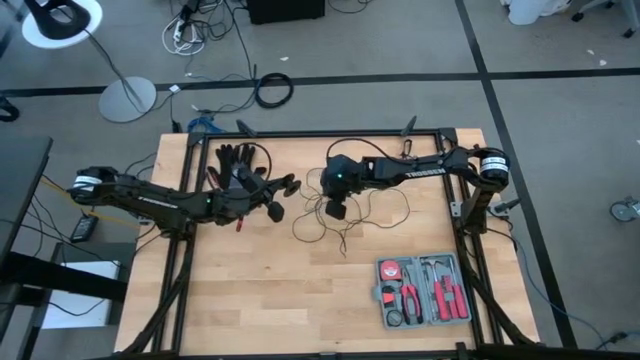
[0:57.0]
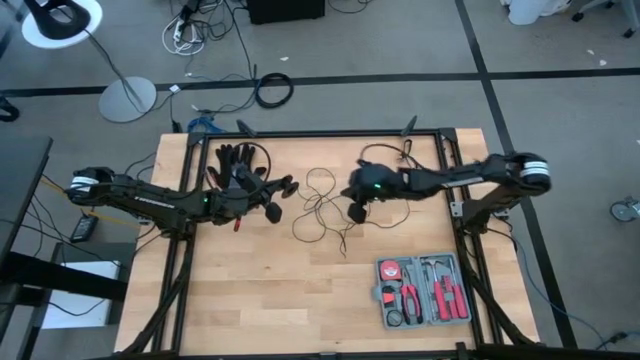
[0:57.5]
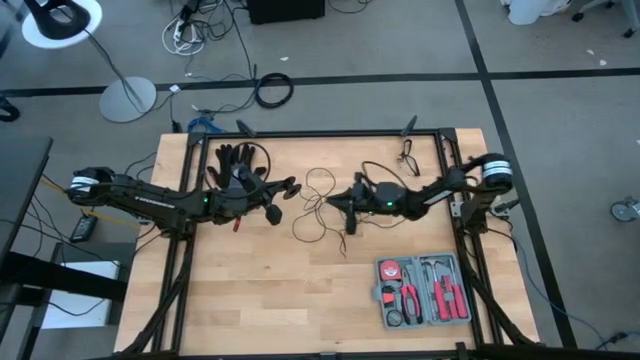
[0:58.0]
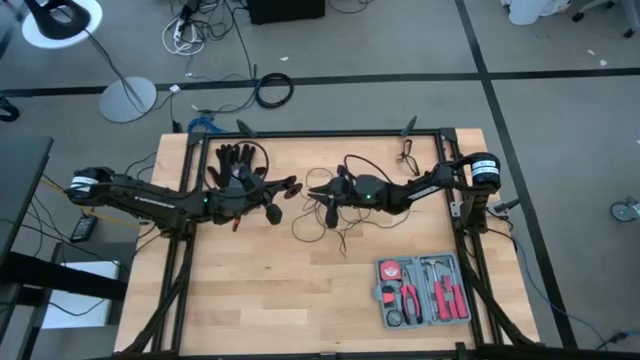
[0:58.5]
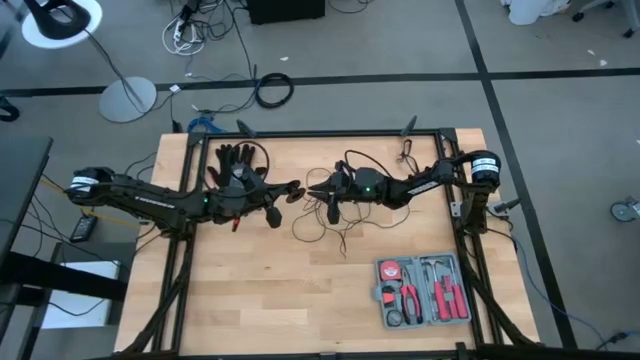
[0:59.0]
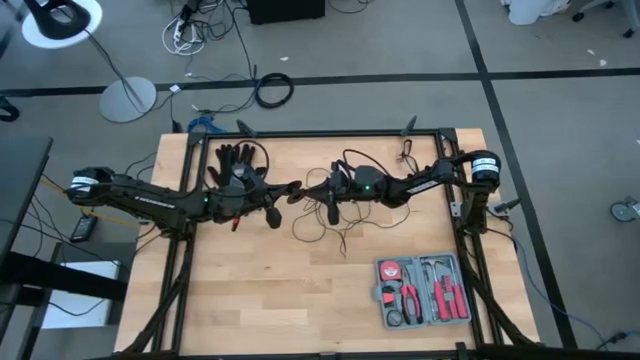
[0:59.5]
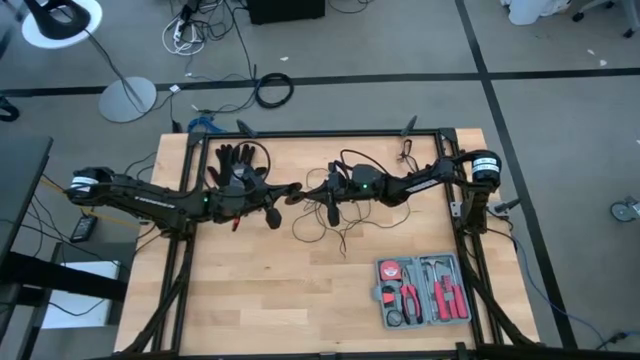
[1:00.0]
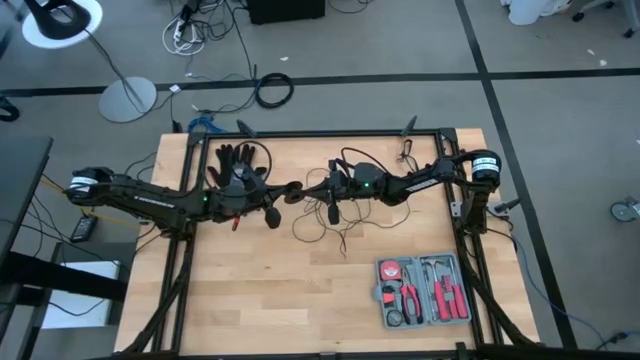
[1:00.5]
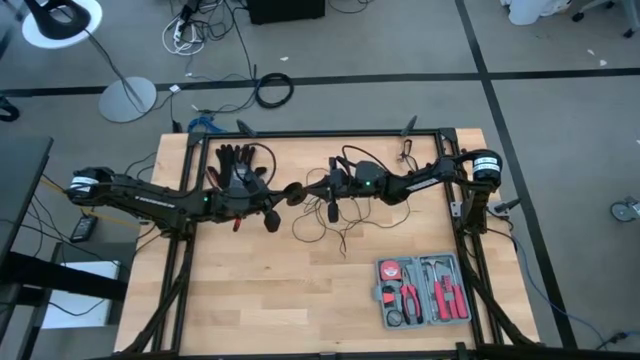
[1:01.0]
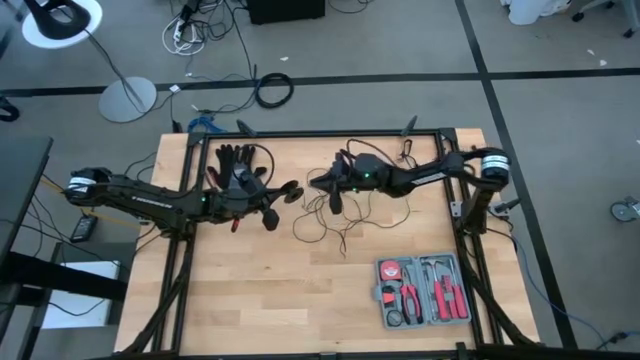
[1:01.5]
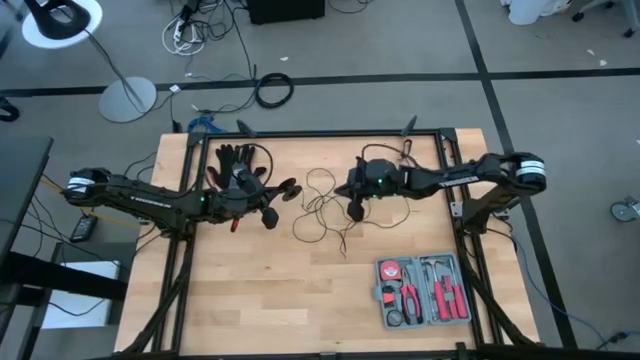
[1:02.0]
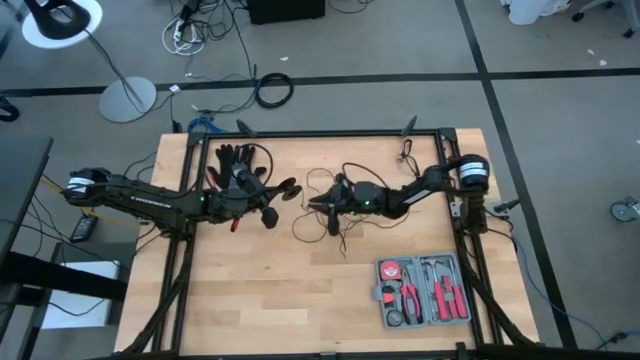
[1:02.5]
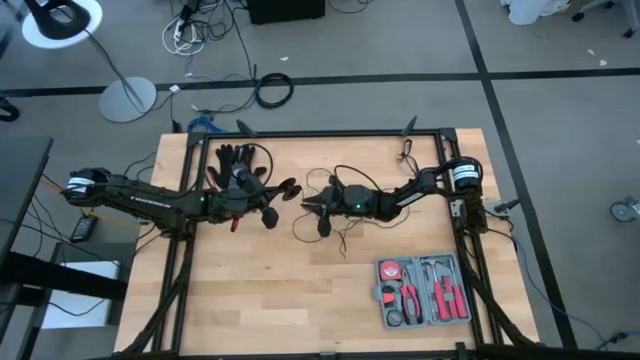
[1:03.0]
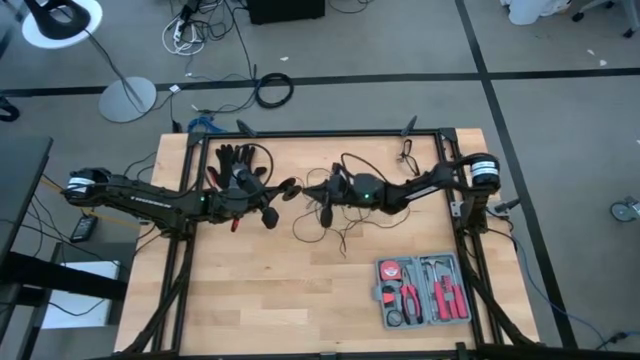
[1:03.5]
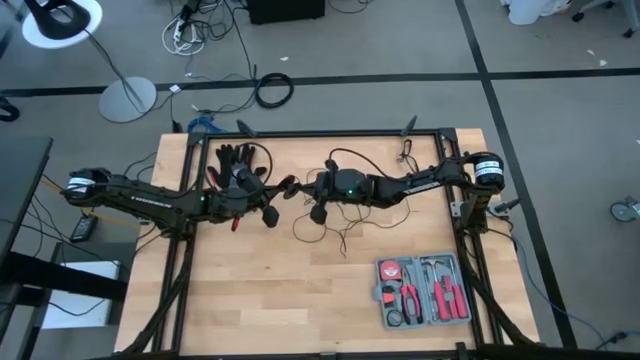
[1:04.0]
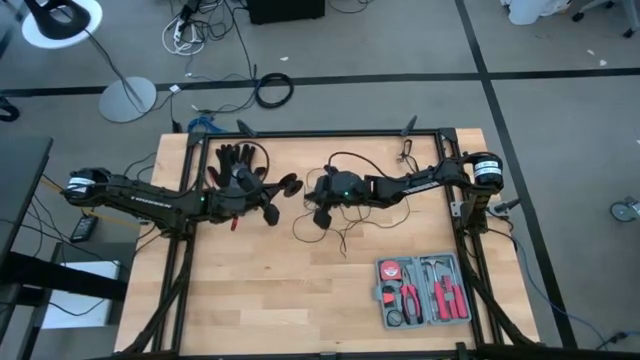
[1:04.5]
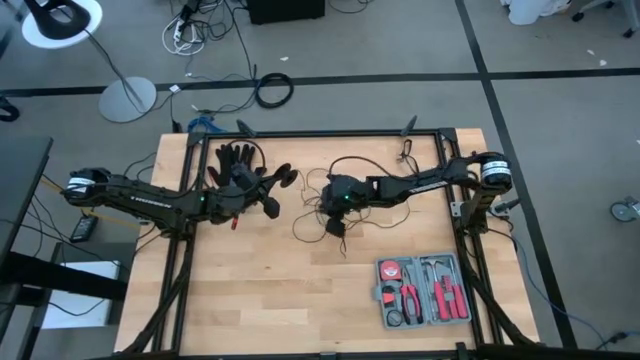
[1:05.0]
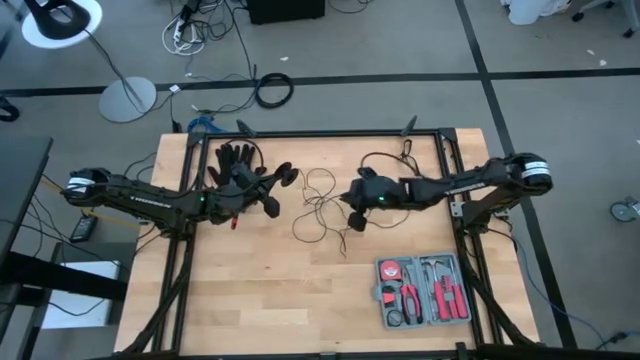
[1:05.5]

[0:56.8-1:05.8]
Task: Coil cords
Coil the black wire

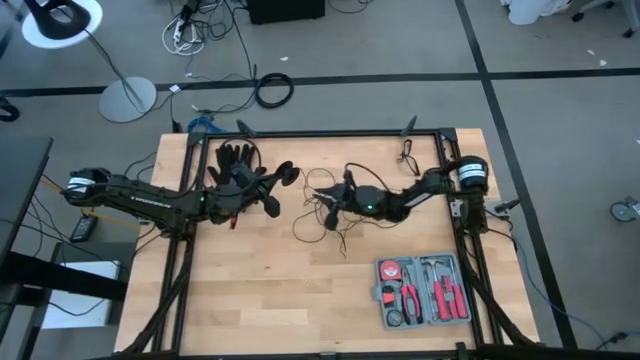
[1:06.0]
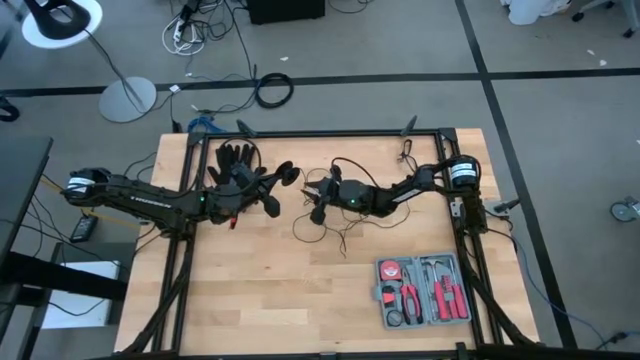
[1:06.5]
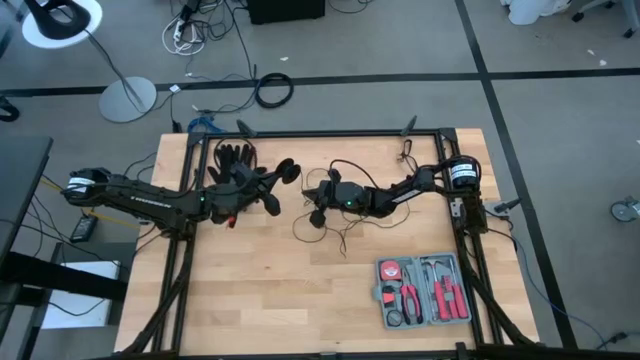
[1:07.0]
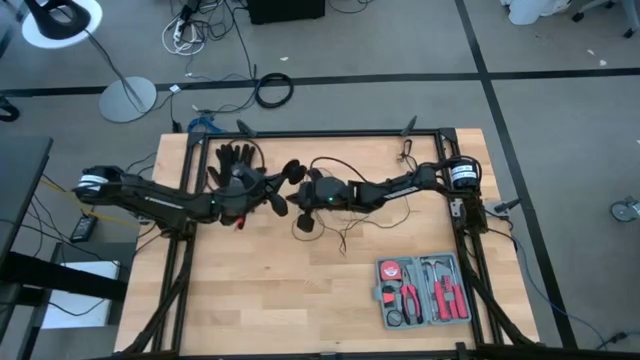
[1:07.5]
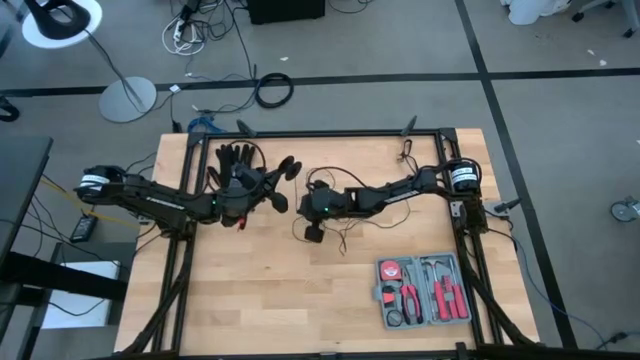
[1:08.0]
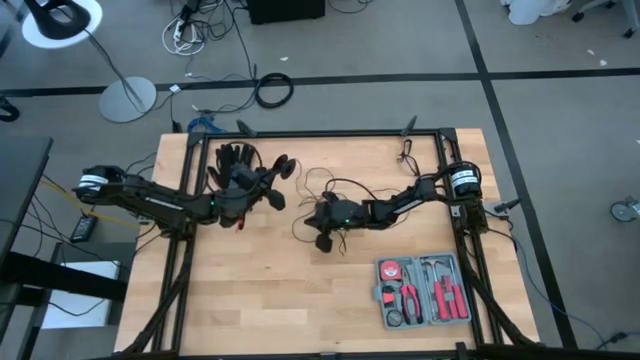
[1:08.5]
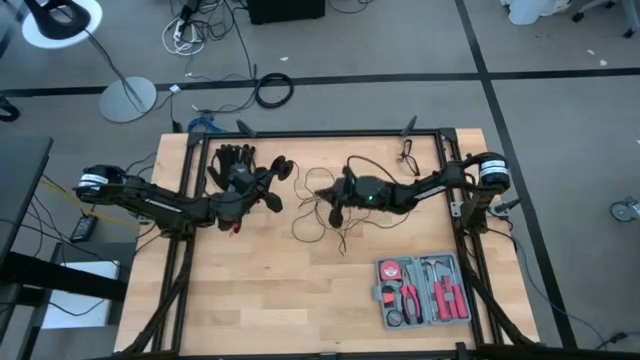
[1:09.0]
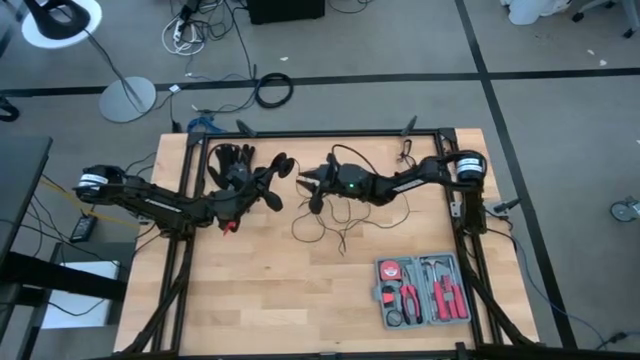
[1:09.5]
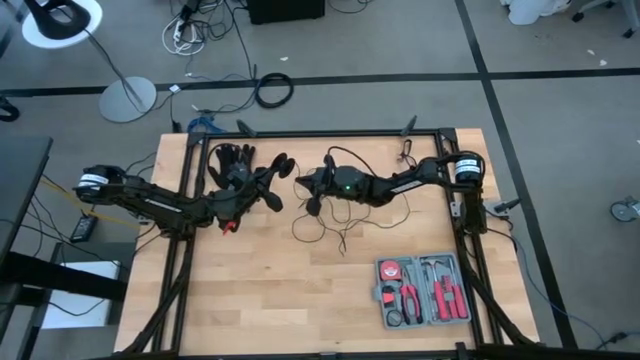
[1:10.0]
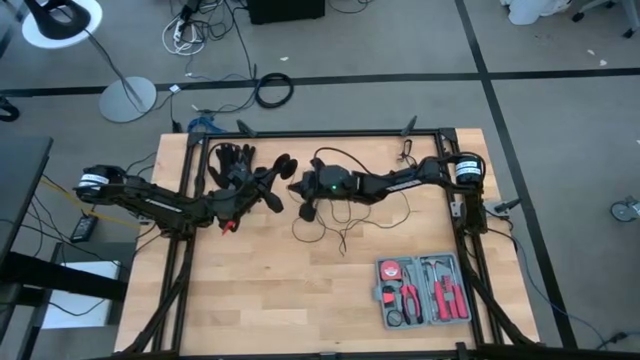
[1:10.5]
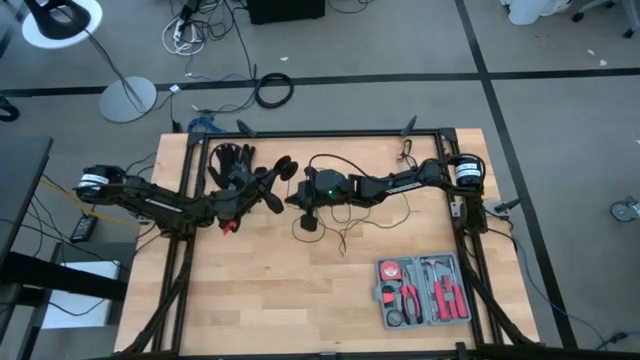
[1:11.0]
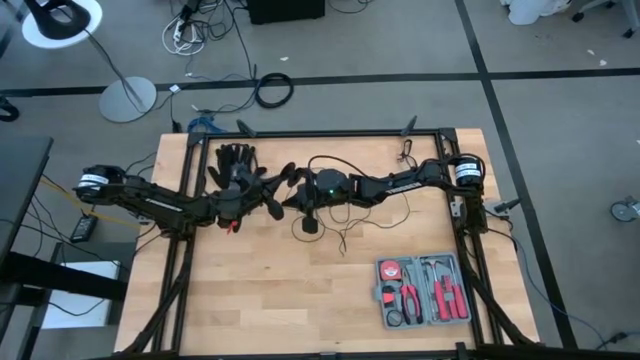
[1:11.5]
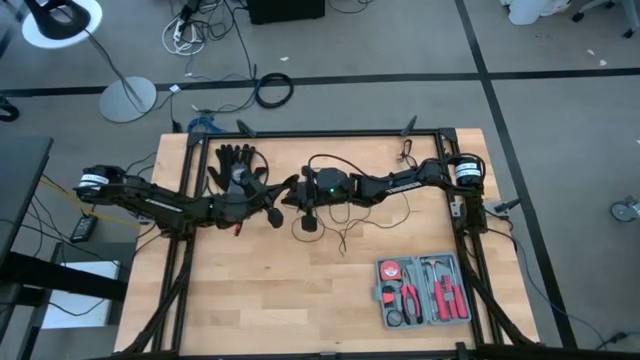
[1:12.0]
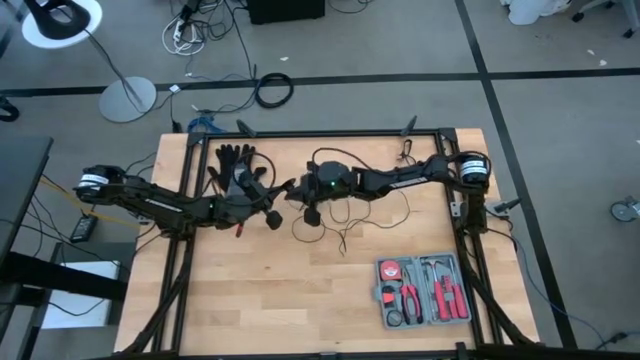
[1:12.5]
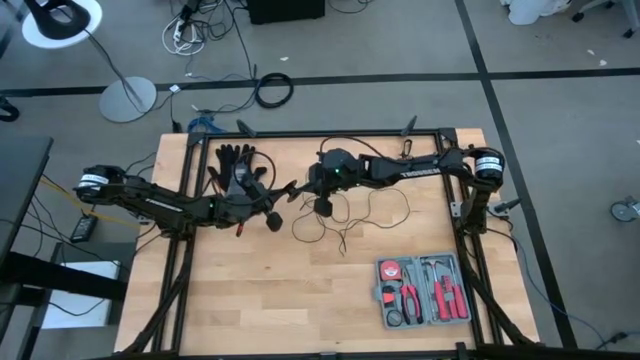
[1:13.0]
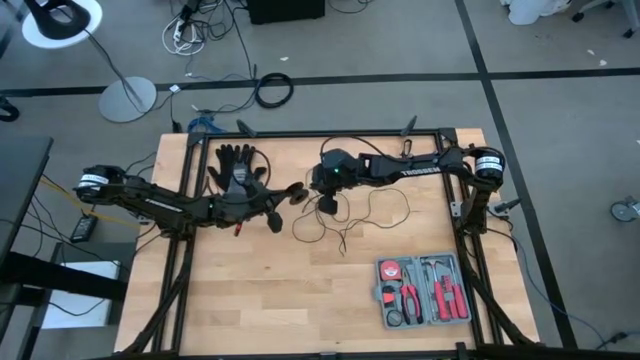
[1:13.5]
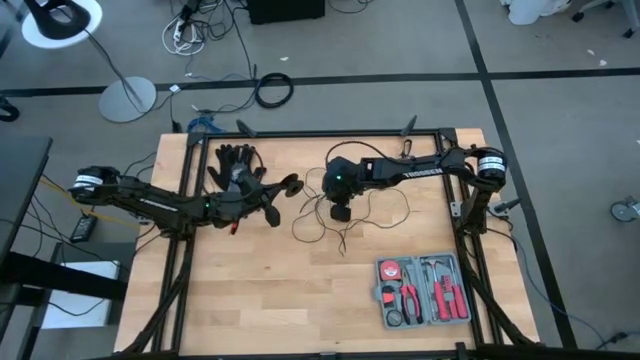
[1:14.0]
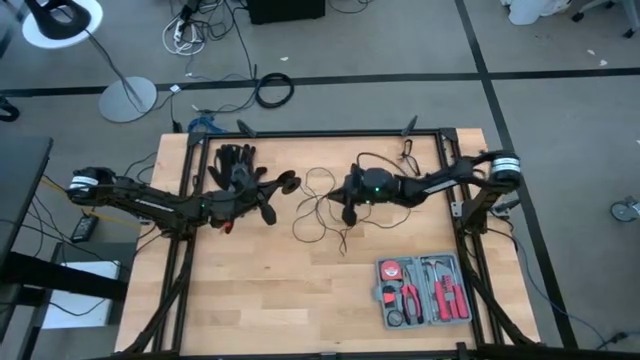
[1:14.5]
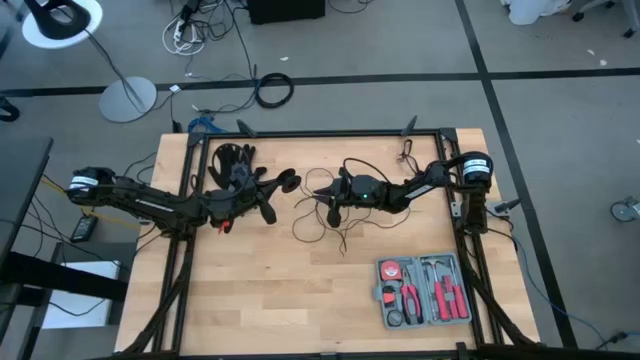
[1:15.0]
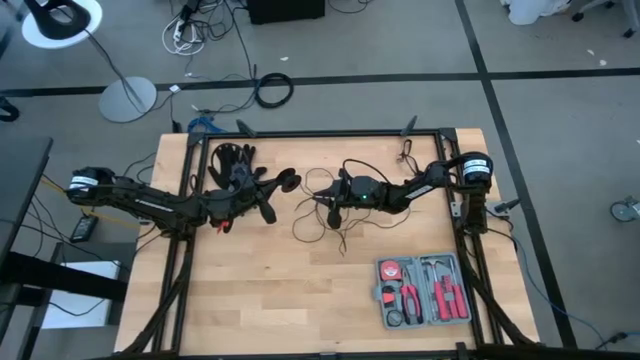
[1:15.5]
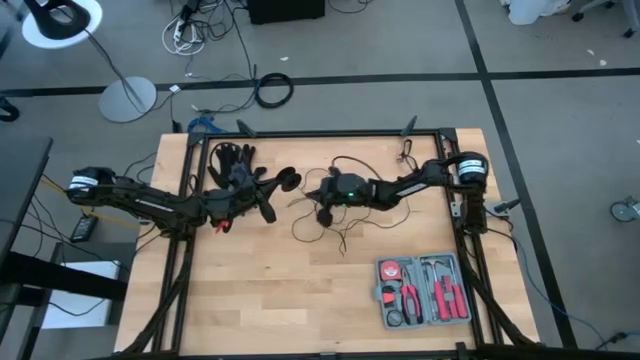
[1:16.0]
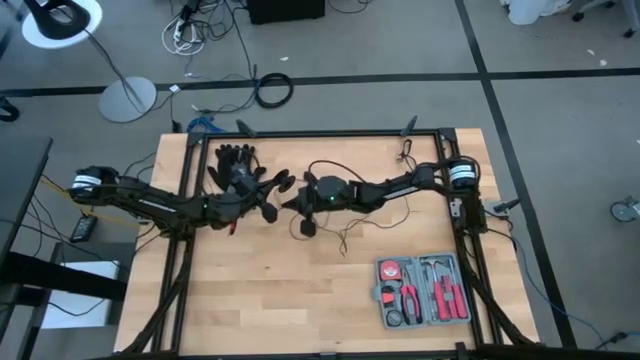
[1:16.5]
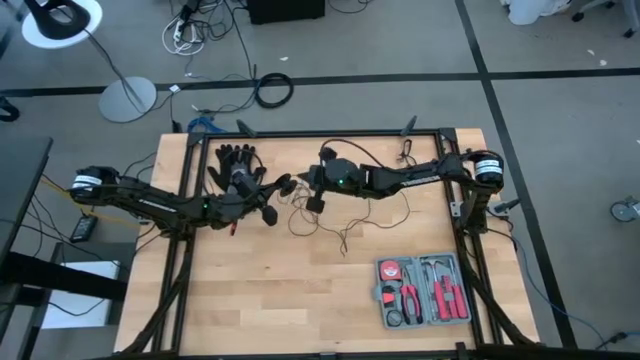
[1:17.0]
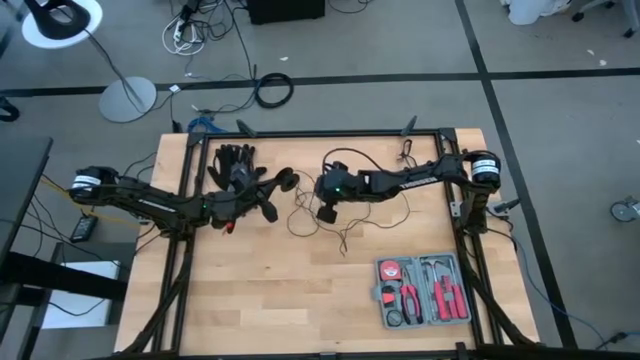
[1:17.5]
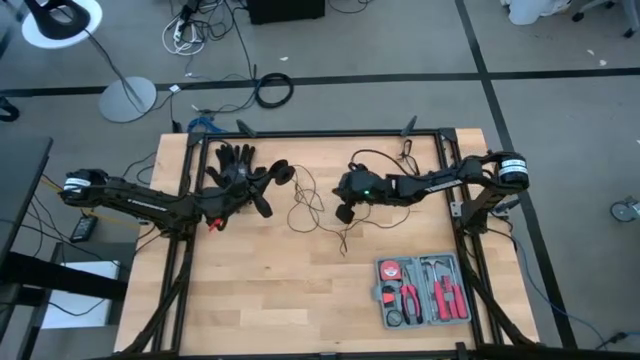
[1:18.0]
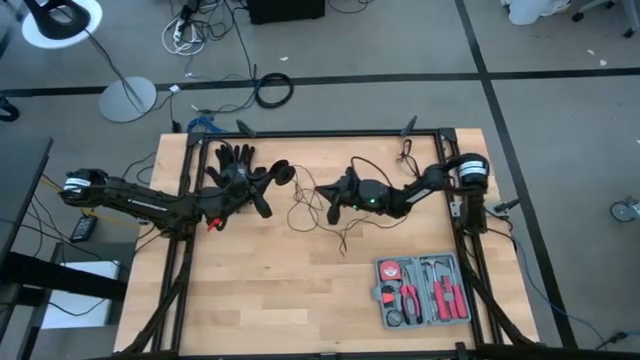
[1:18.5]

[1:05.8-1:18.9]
Coil the black wire
